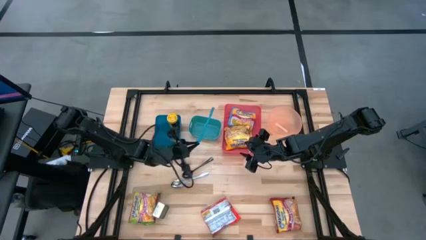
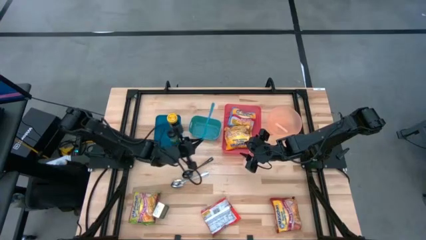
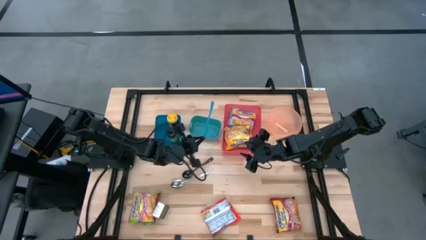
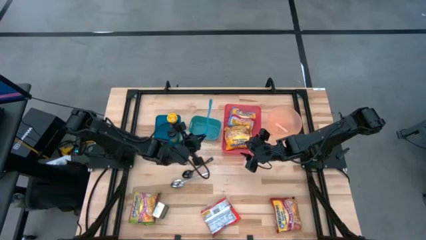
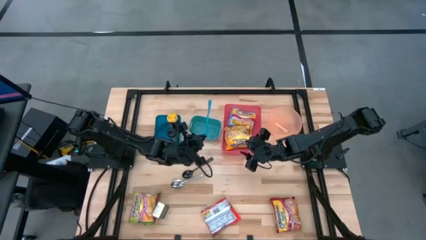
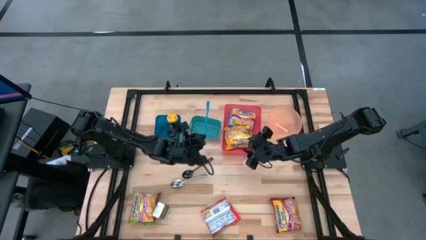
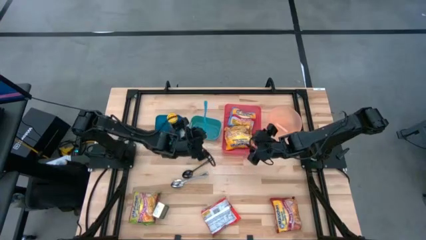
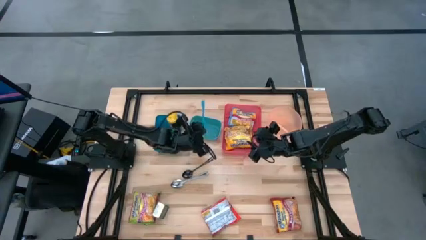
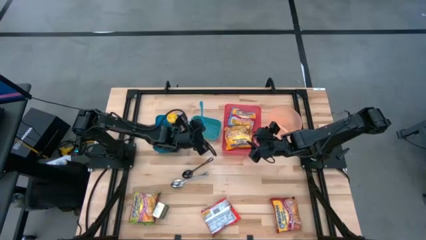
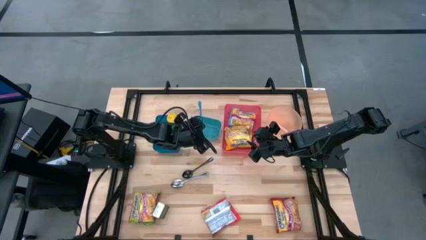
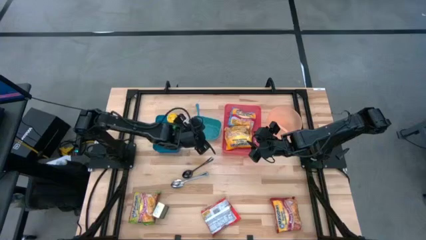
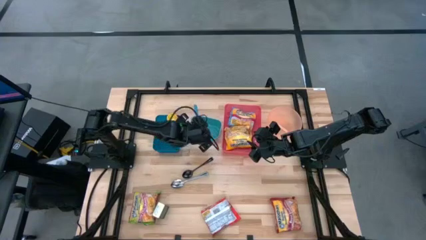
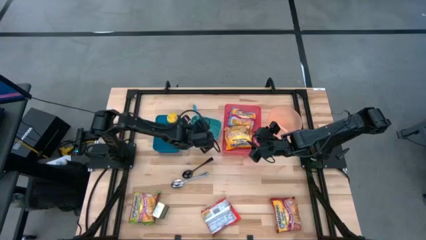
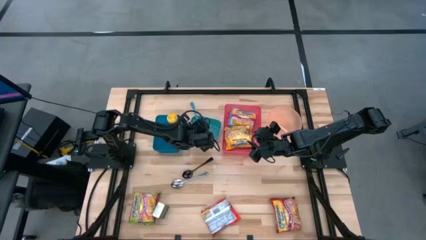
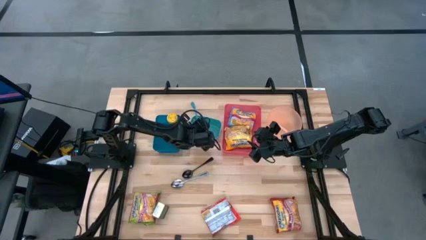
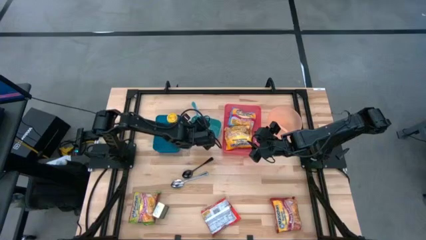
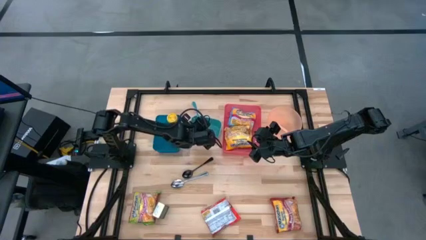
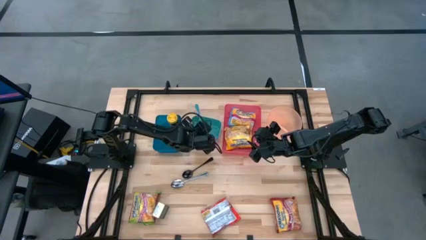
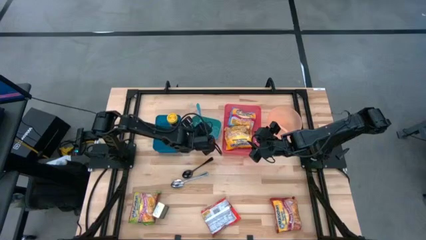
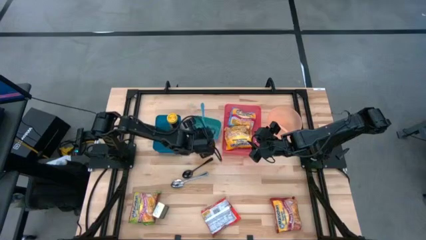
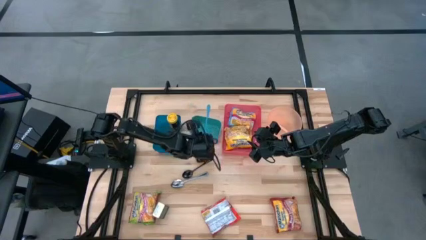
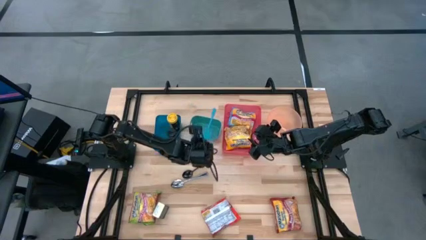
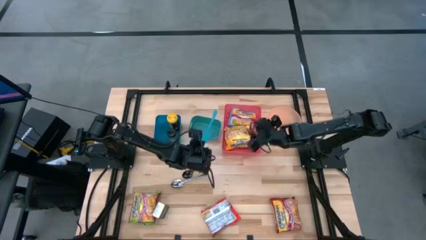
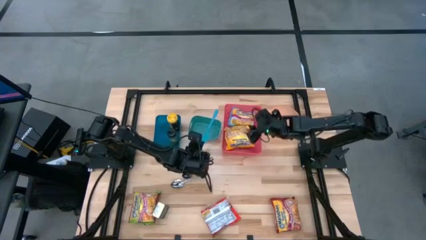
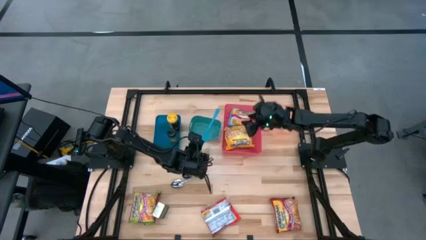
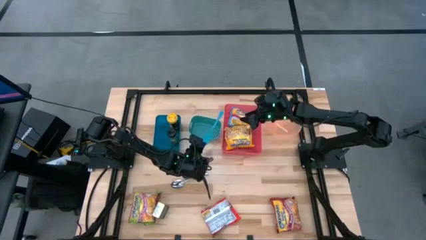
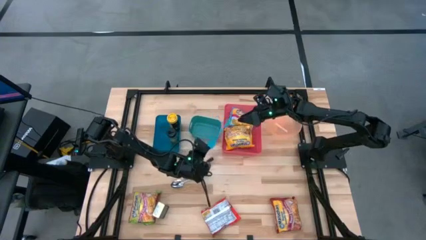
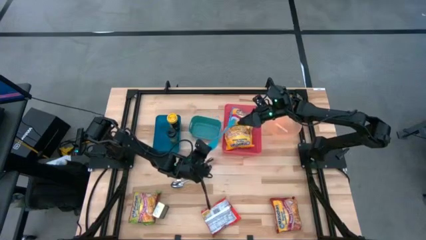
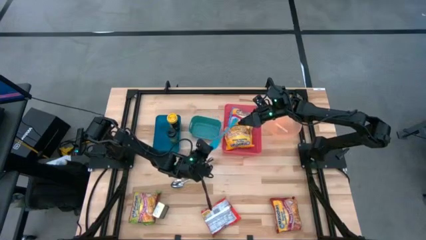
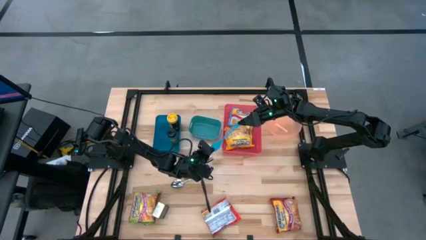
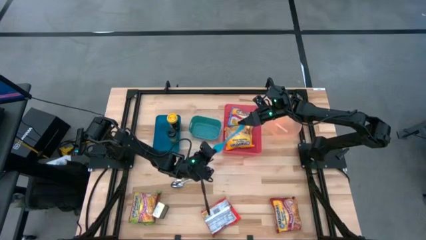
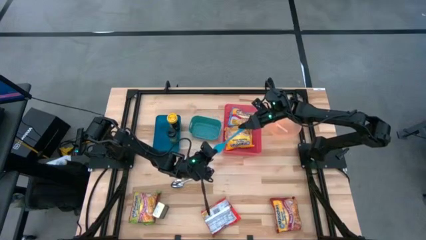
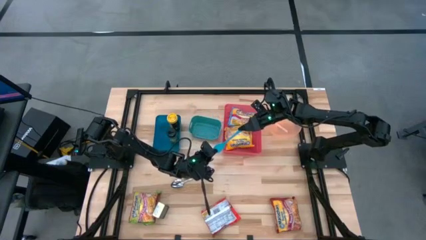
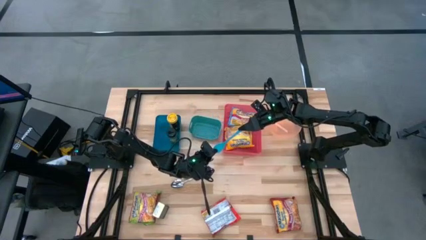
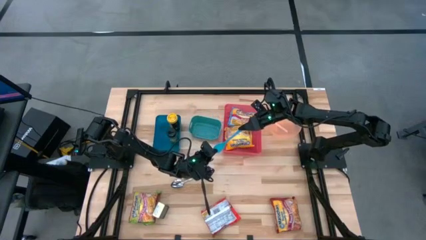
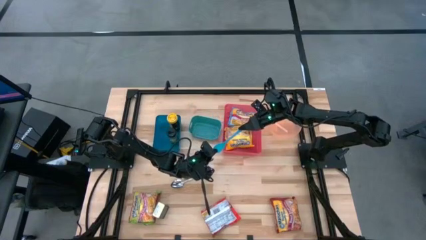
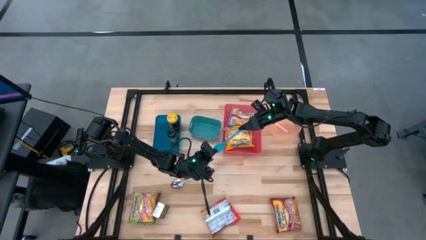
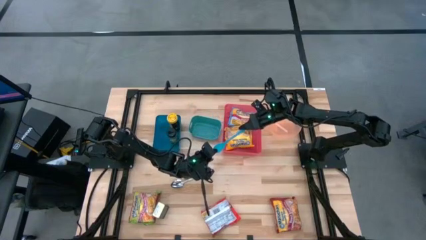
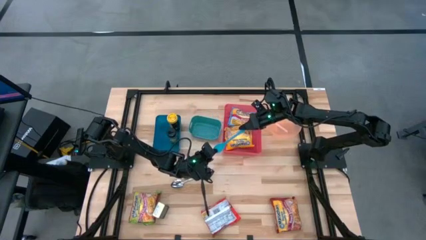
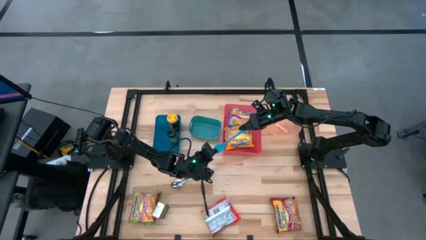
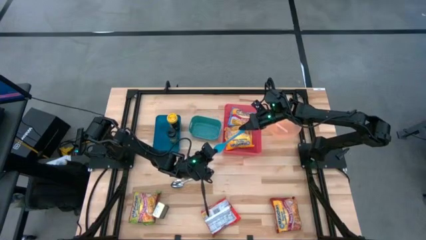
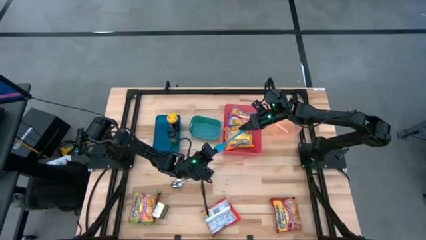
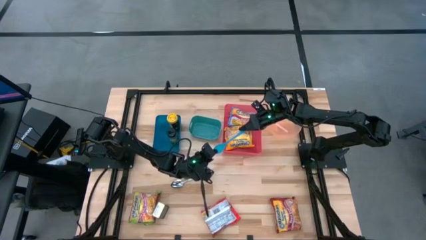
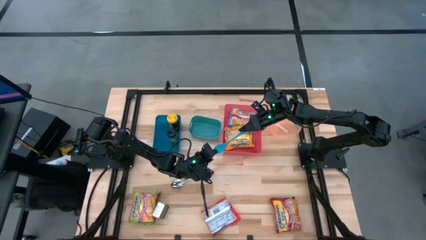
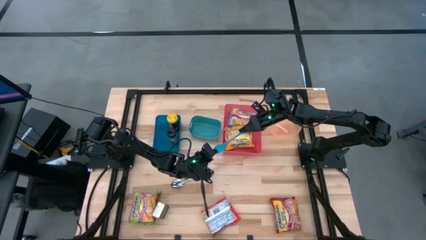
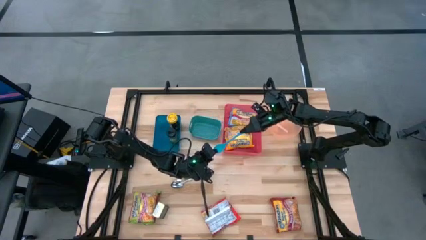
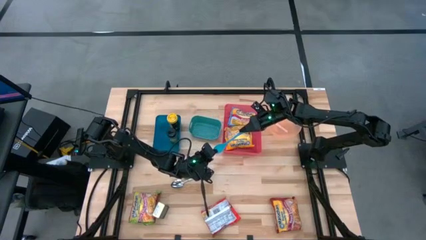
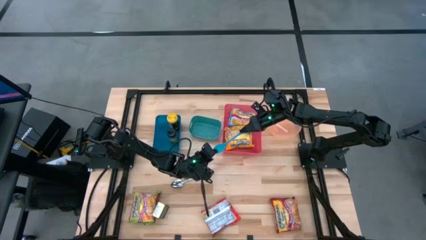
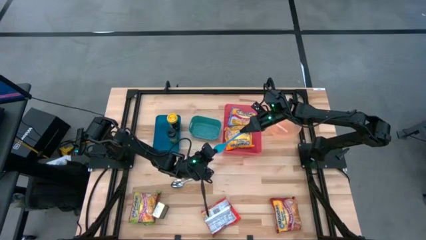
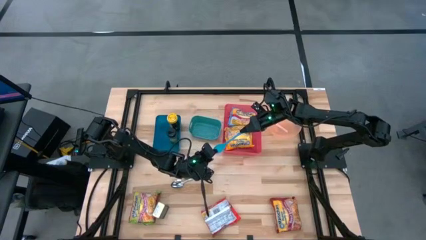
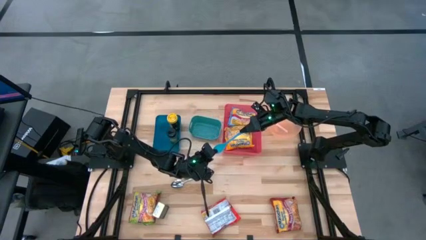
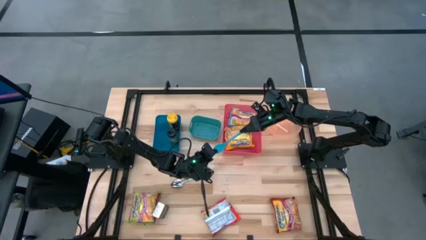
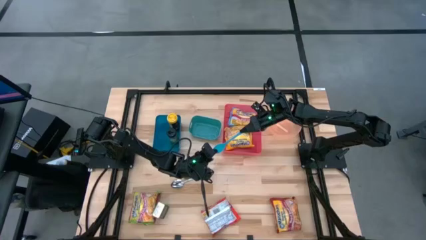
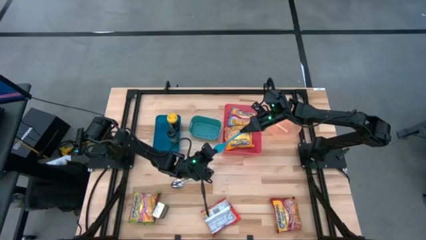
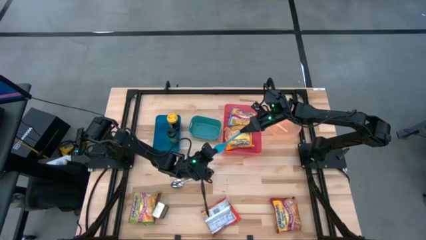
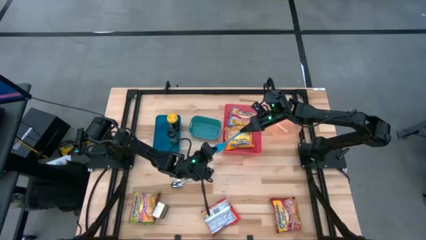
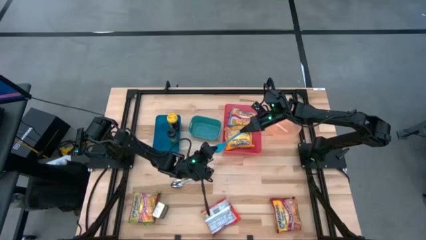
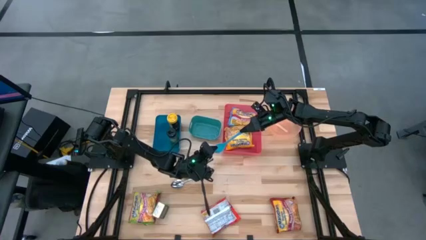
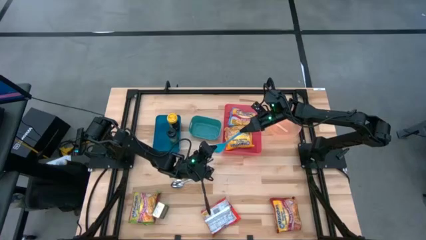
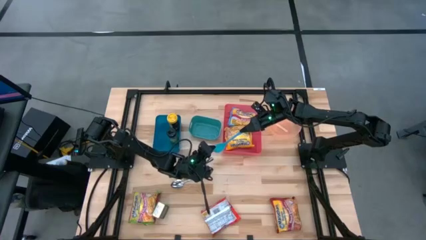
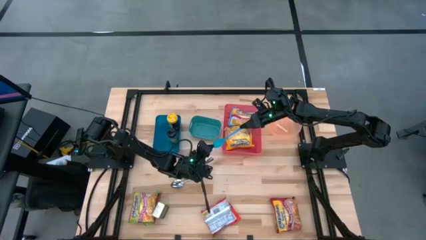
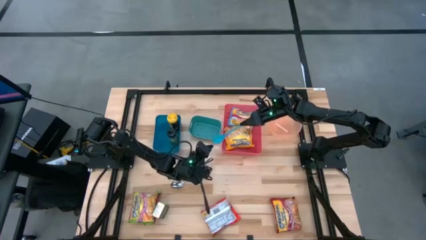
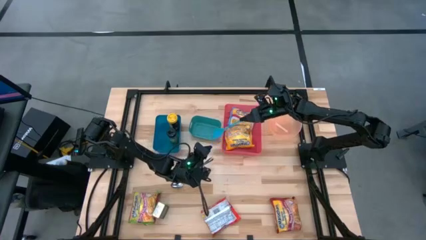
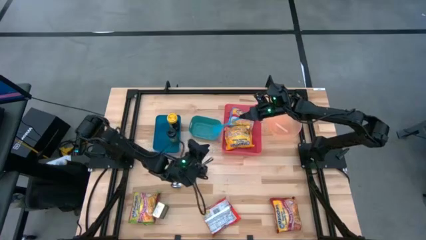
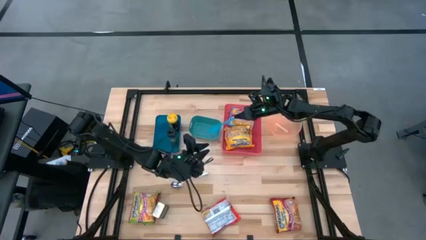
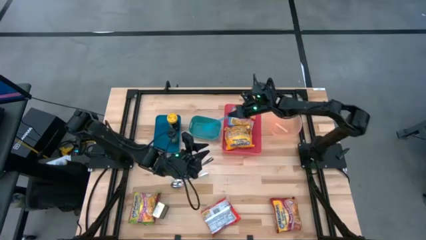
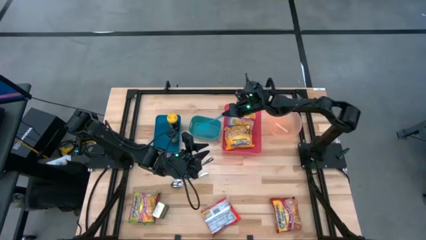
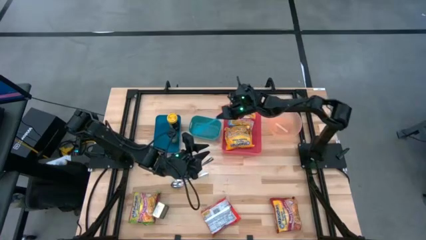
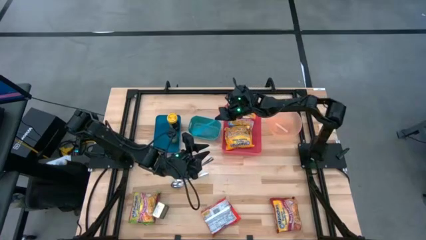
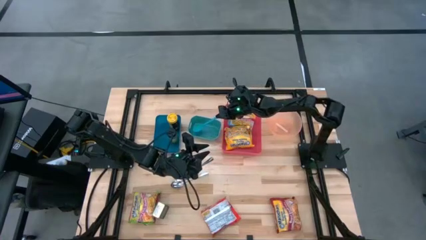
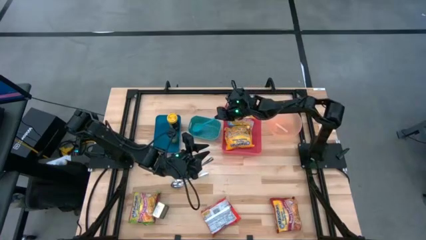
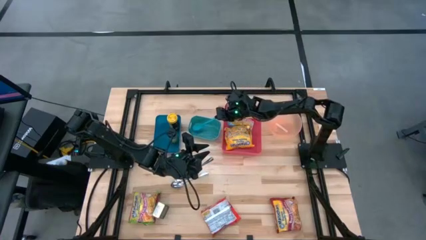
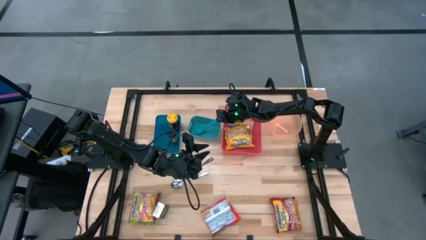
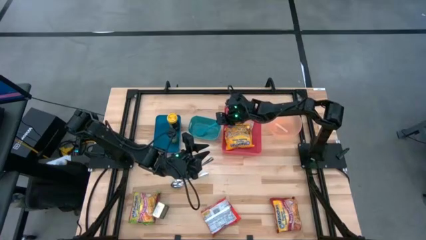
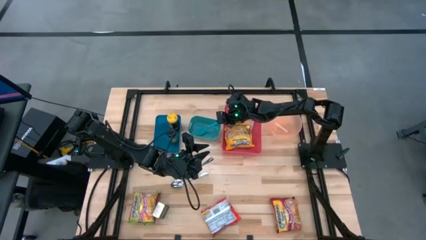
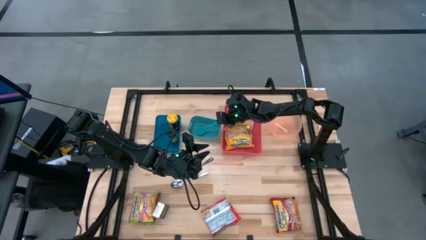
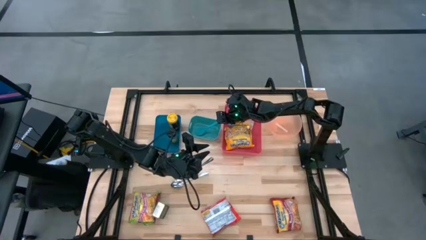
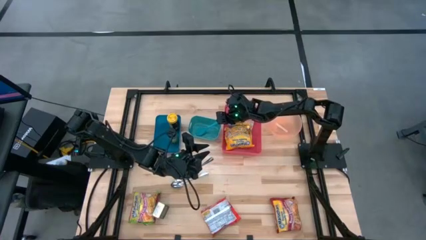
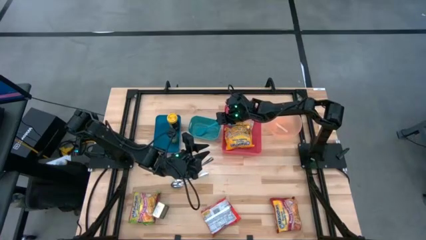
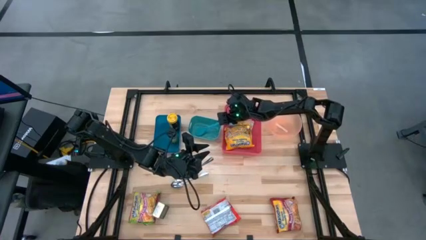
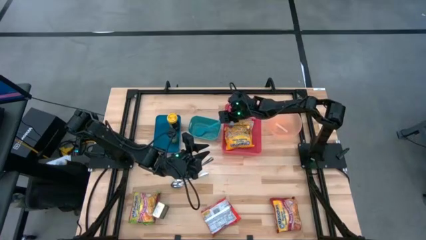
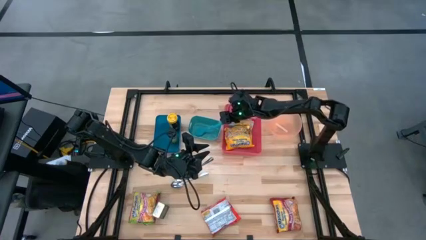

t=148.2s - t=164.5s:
Task: Pick & Place Food Item
Put the blue baby spoon into the green bin

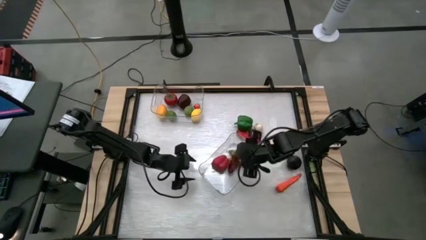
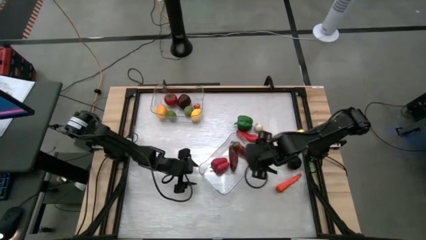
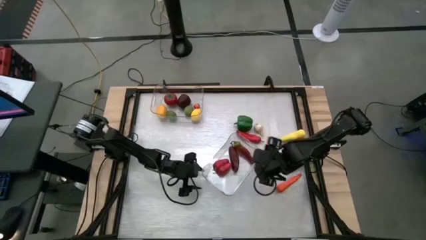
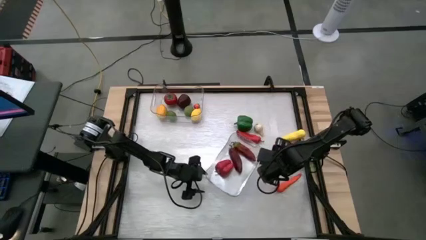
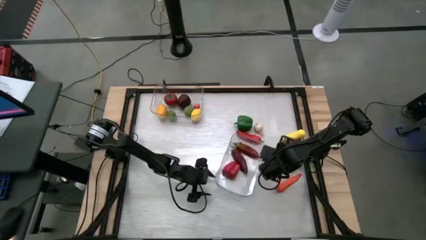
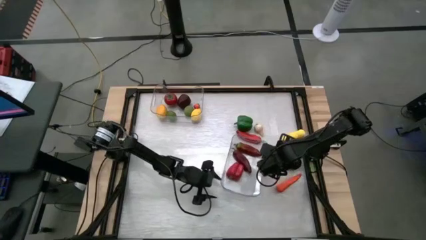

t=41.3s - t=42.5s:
Task: Sort produce into baskets
Adjust the bottom transparent bin
